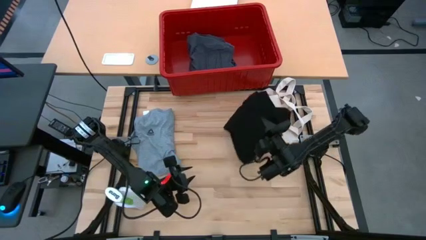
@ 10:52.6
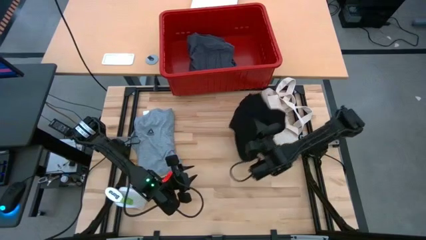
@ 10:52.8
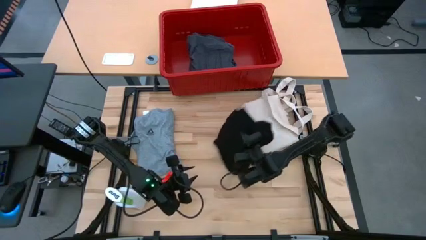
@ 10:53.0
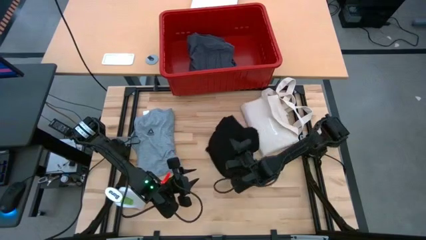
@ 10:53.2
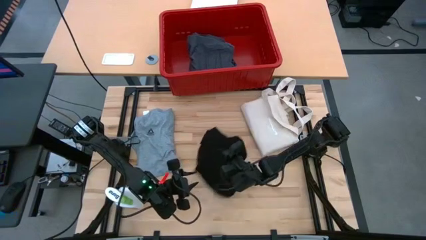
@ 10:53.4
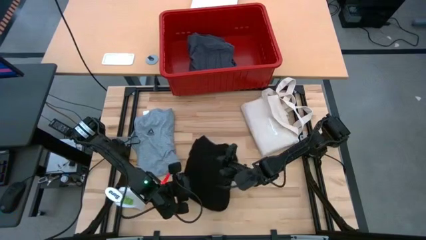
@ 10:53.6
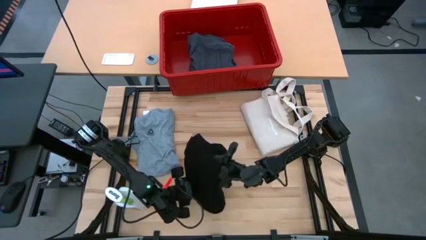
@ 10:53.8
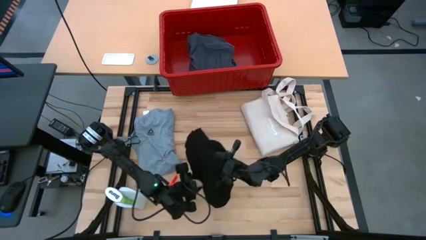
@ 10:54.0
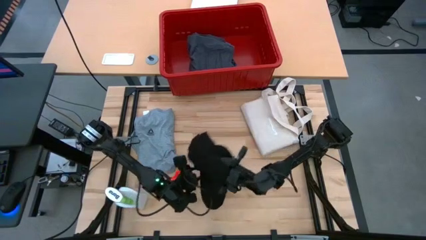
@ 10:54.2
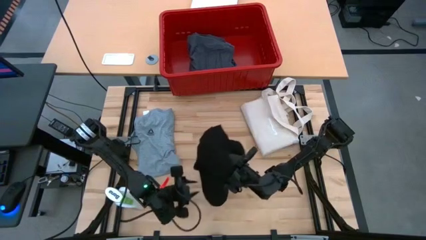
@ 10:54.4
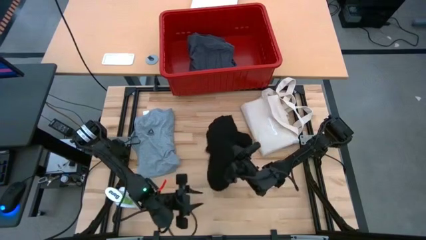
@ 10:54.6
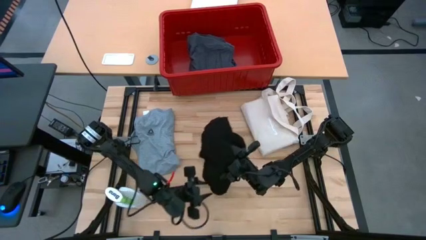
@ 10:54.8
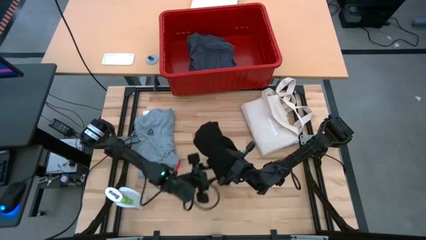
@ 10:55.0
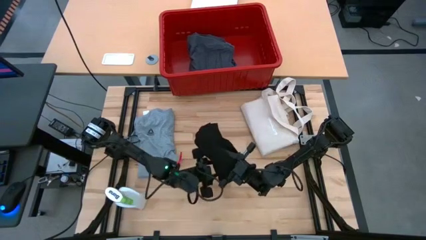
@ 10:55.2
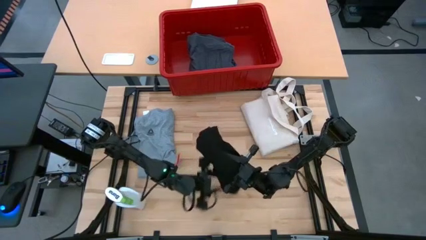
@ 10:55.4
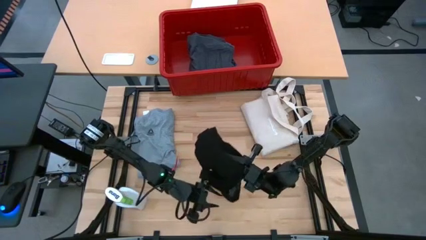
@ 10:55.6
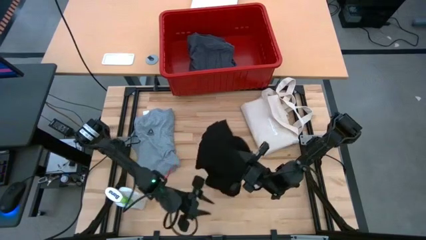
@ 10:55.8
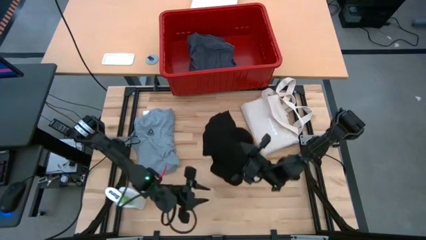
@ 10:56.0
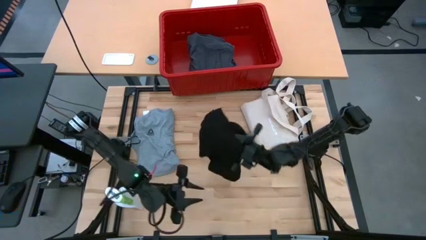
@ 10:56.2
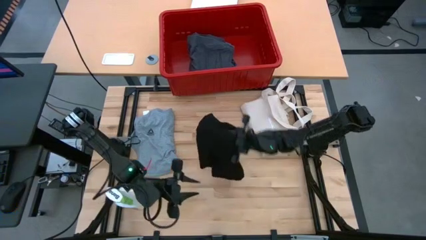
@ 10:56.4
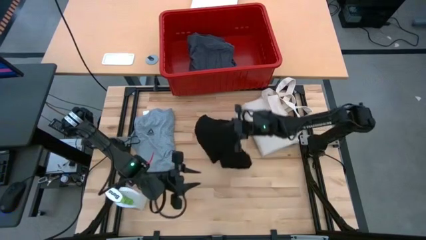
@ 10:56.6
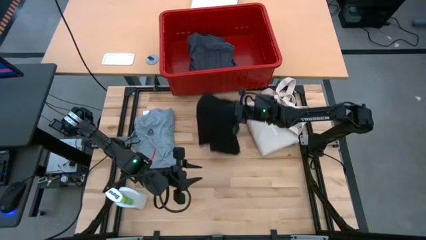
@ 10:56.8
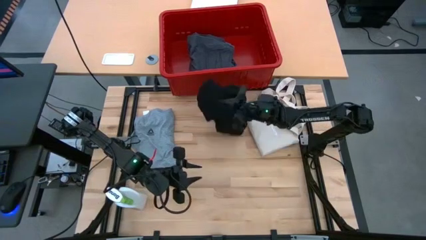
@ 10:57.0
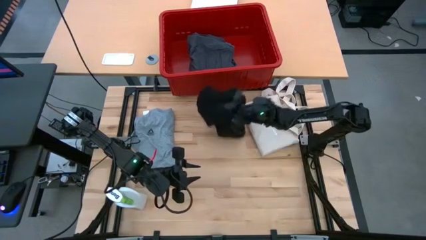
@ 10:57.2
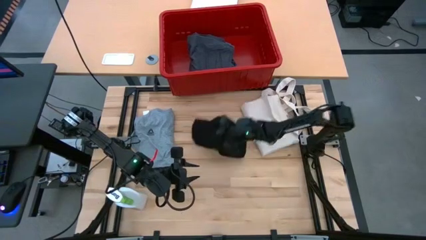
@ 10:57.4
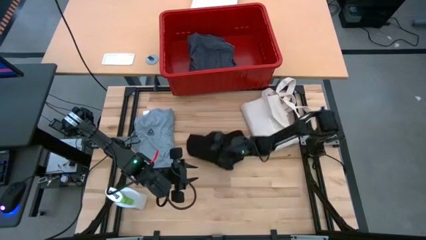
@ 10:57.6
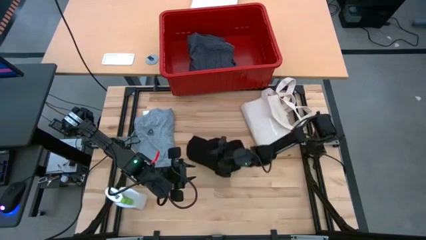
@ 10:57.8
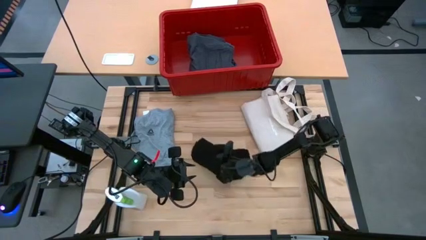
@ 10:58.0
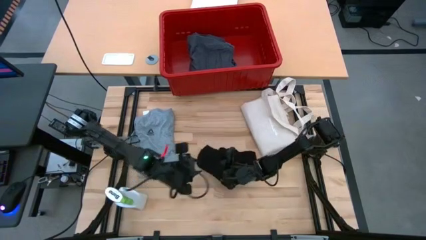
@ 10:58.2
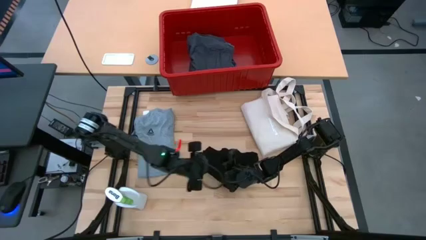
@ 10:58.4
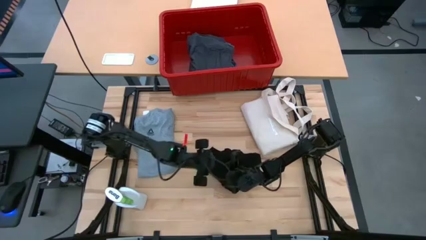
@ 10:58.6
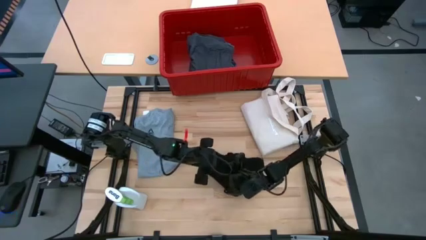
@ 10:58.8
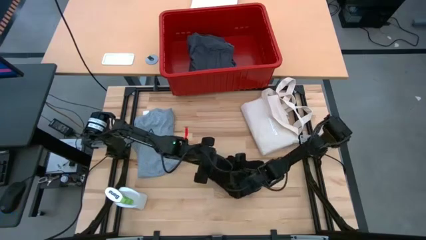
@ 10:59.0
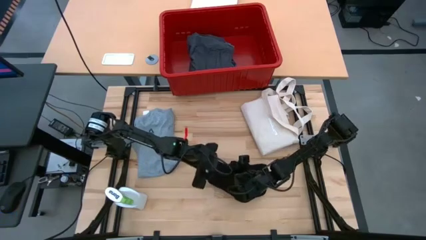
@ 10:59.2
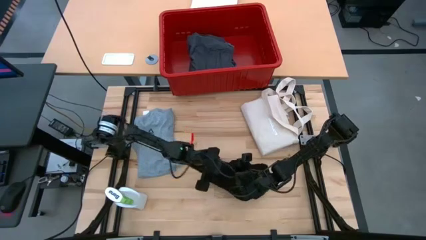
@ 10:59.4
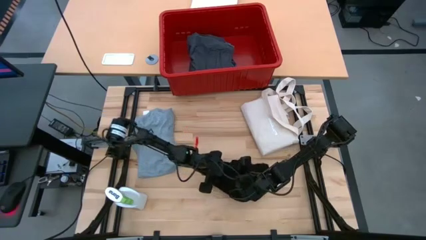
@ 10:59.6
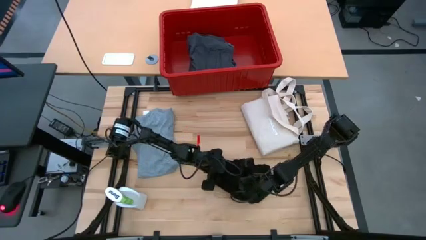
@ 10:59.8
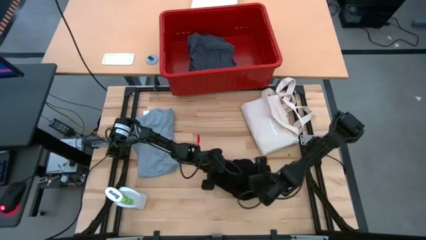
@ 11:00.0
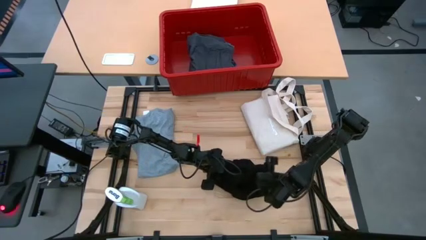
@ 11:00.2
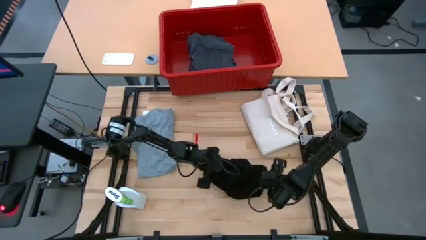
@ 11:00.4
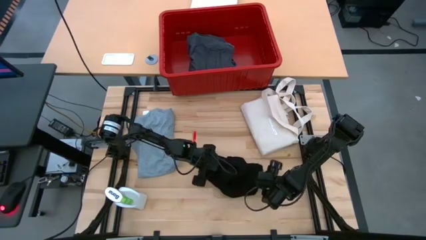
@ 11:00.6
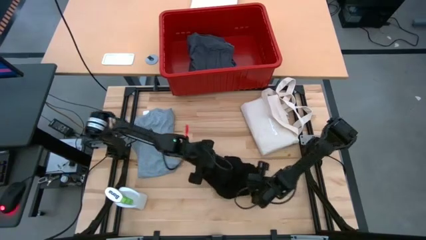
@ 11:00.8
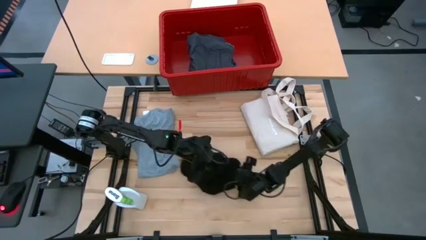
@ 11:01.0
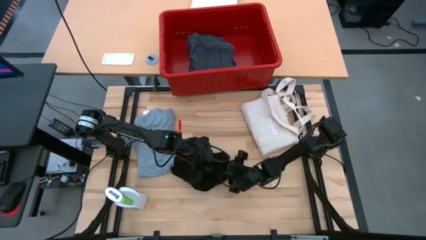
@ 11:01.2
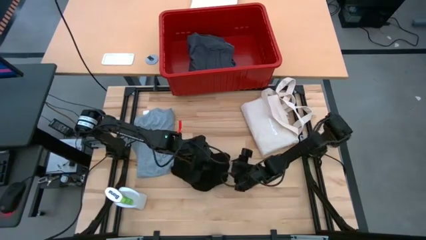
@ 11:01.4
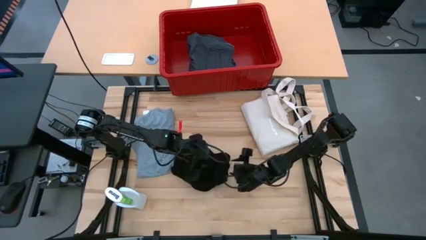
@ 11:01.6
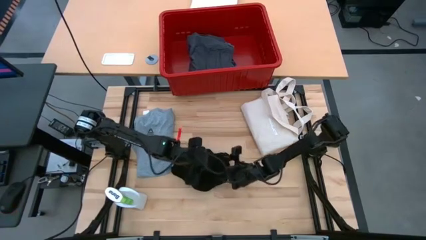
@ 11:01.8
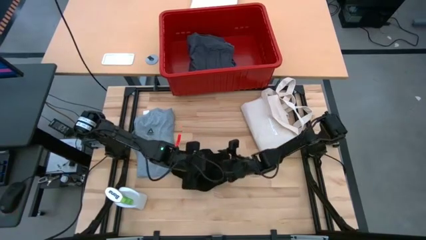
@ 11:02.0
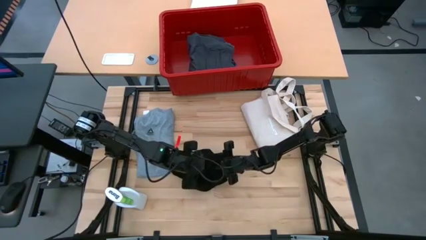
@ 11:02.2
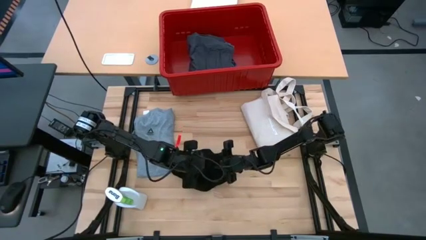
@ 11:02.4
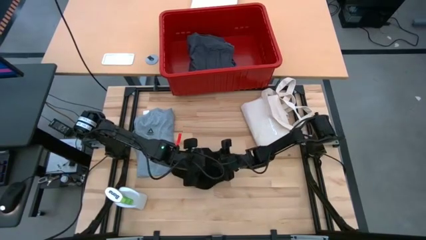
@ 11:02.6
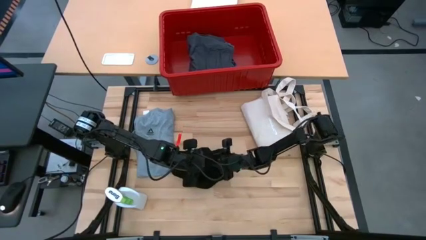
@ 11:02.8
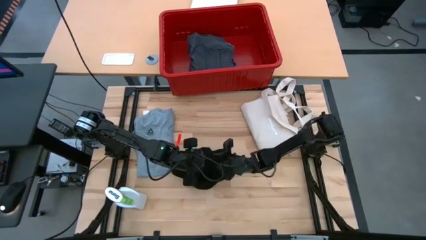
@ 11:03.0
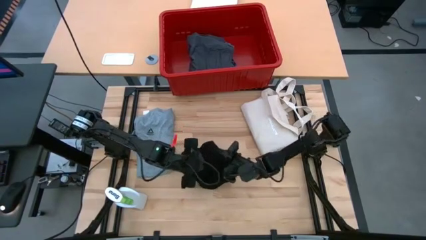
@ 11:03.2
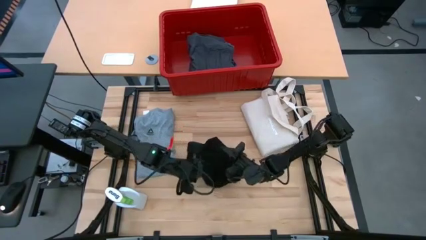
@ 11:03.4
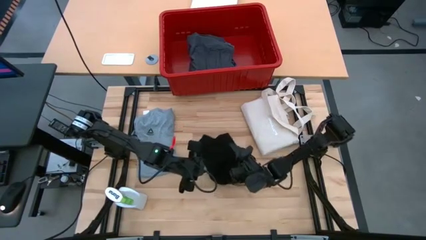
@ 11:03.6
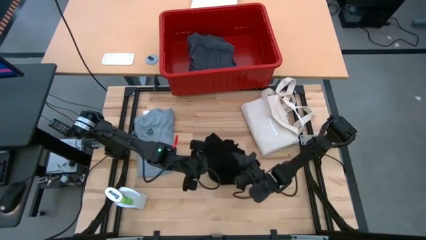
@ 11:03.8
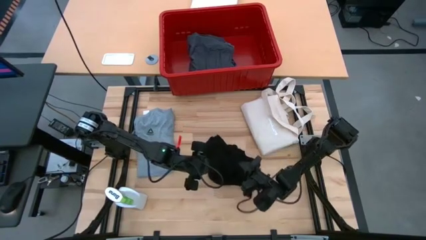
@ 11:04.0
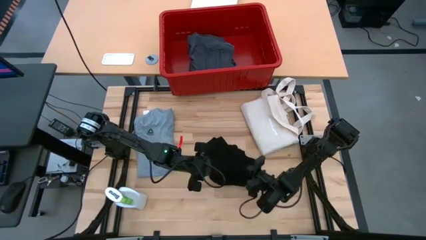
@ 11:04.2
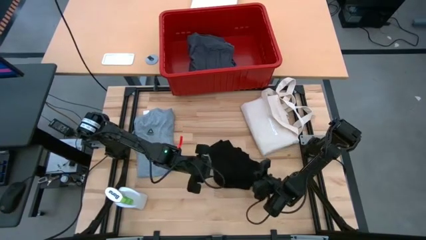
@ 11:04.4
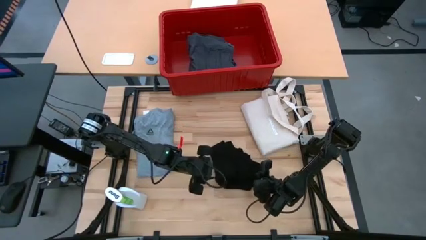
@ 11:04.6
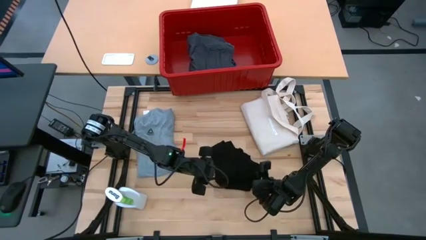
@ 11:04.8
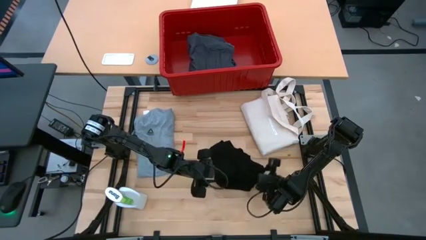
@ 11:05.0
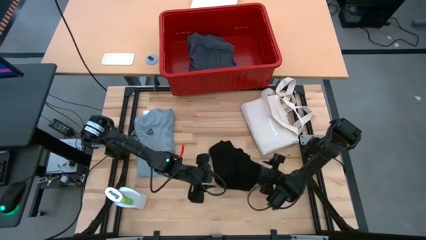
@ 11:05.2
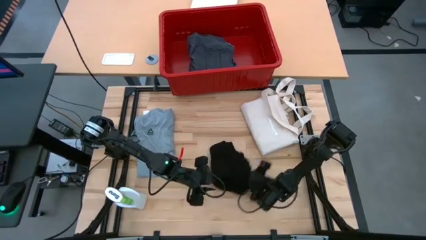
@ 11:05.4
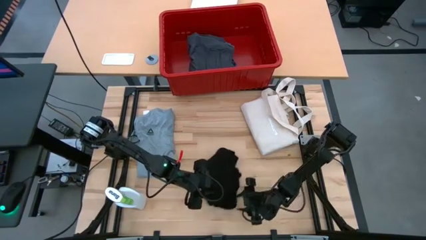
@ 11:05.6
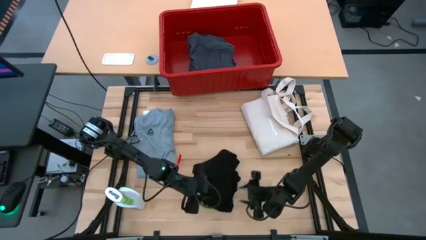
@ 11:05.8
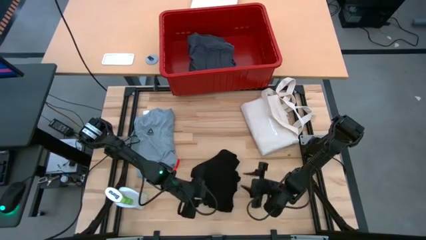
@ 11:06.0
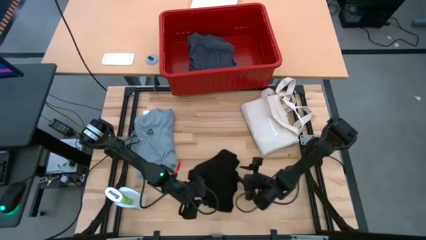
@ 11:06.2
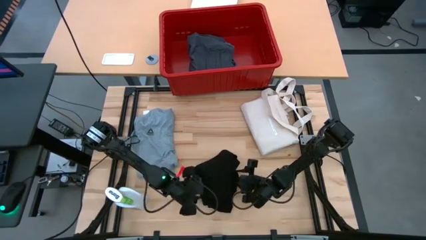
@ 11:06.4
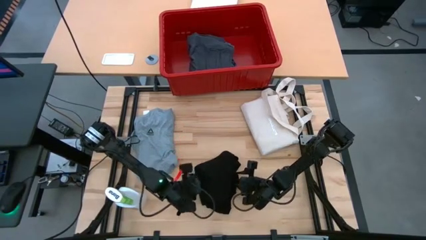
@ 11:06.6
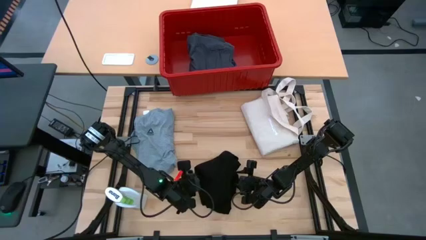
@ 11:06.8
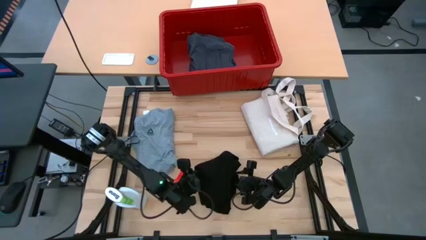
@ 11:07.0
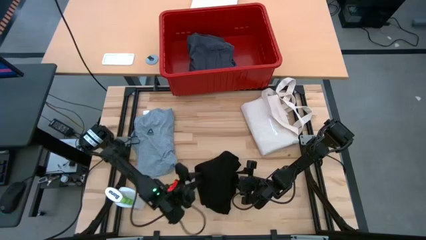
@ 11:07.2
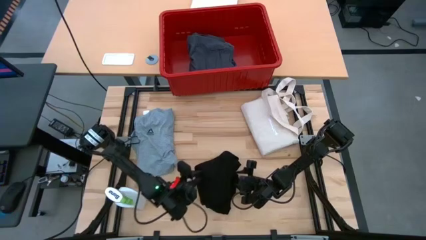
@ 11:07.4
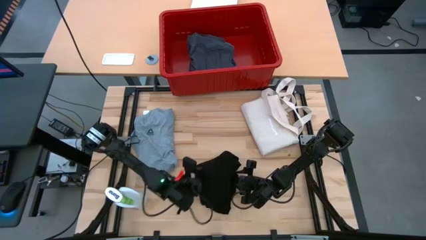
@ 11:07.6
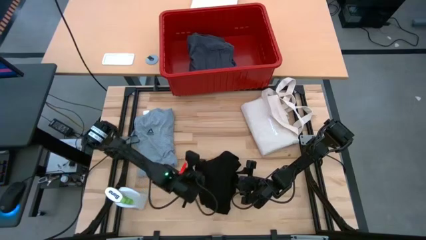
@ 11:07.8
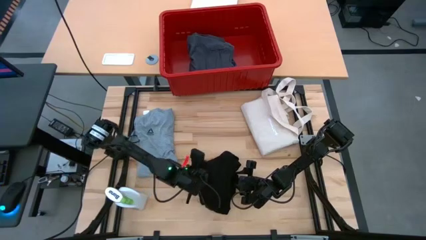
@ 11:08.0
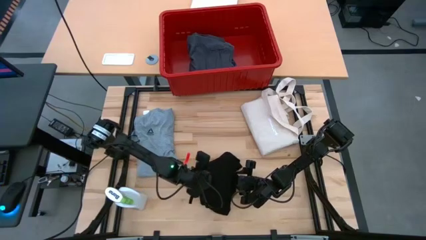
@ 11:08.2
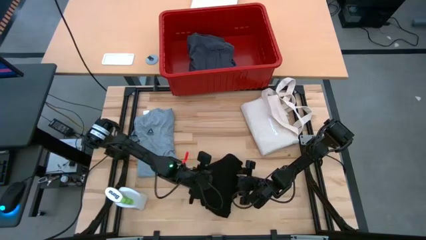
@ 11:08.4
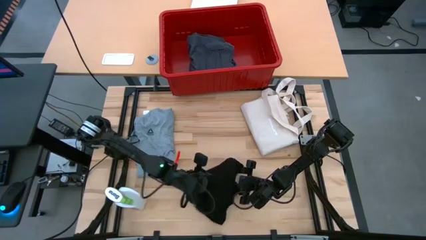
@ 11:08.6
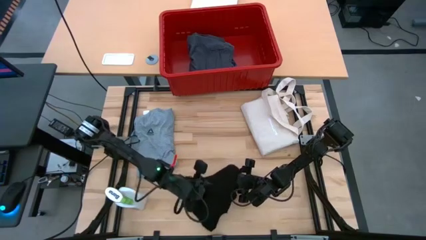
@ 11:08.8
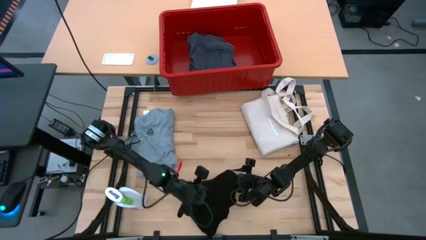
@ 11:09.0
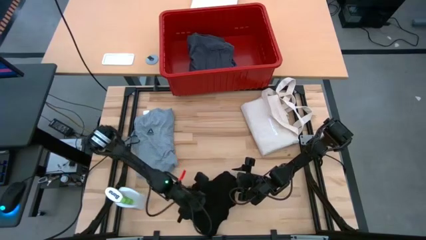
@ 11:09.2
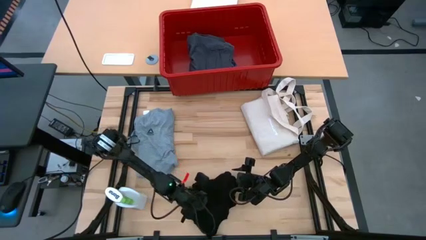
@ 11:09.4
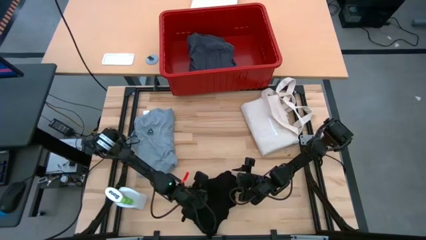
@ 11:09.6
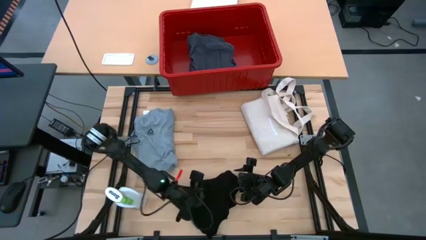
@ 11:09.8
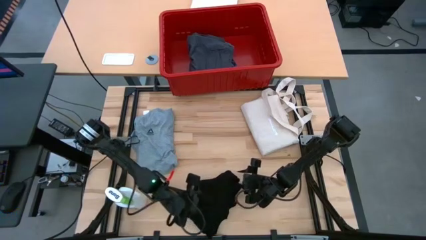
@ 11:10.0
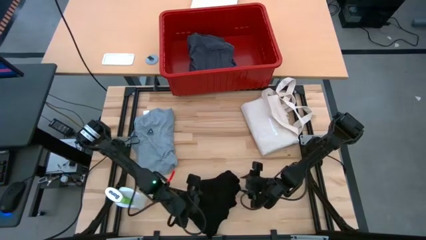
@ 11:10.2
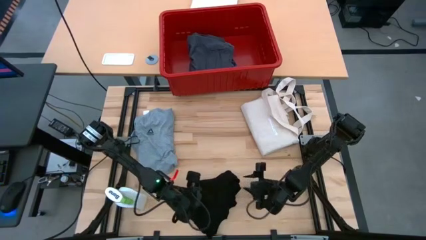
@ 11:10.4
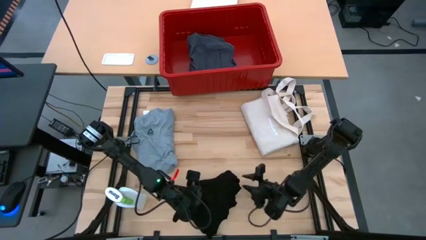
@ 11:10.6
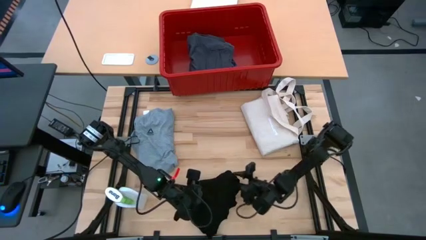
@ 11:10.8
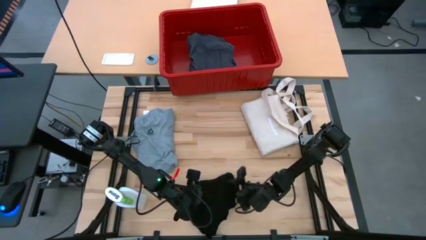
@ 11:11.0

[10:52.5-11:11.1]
Task: Fold Laundry from Bin
Fold the black shirt
